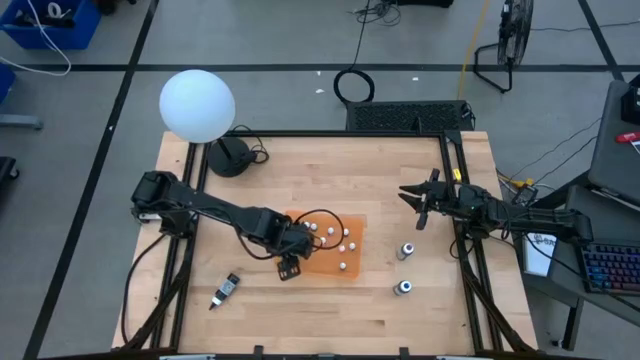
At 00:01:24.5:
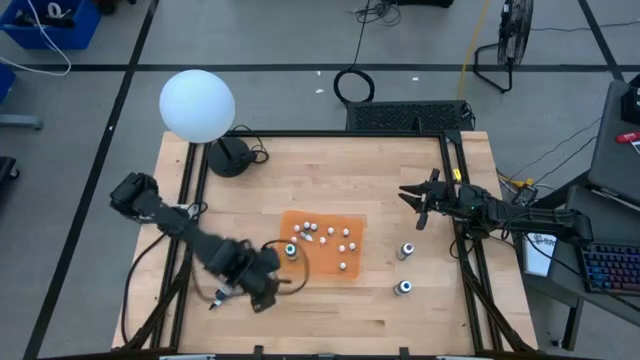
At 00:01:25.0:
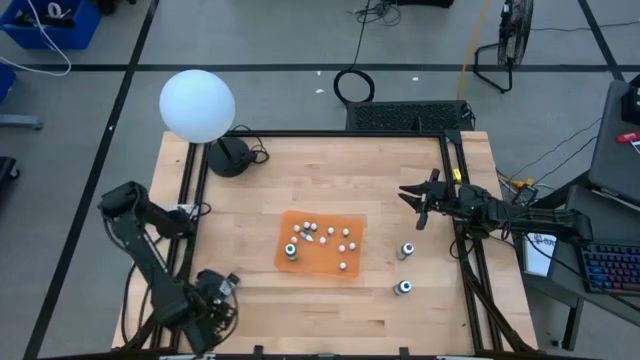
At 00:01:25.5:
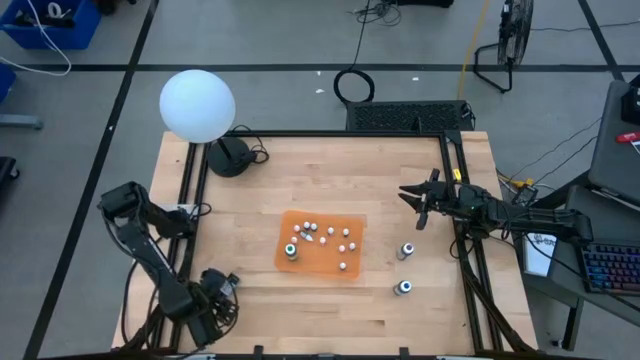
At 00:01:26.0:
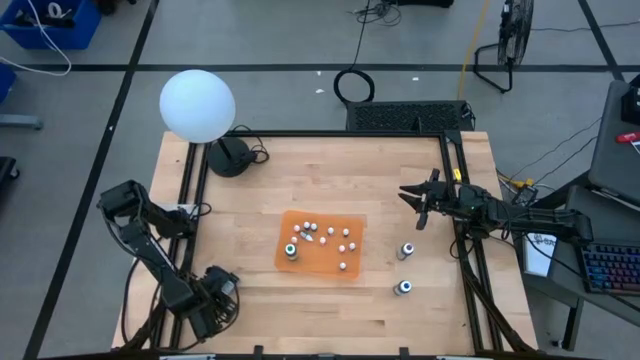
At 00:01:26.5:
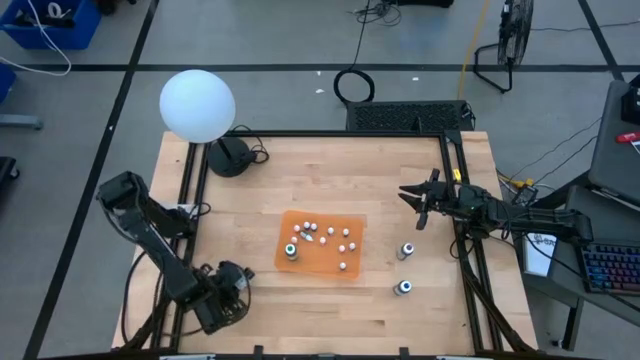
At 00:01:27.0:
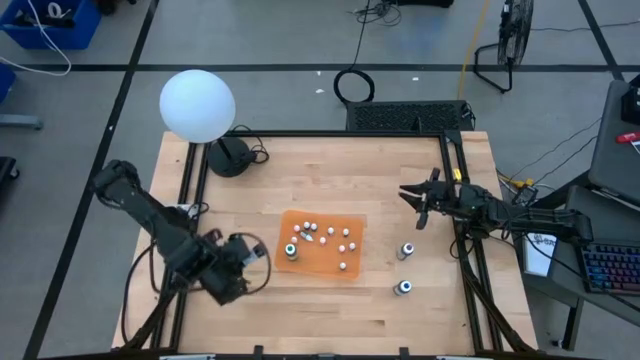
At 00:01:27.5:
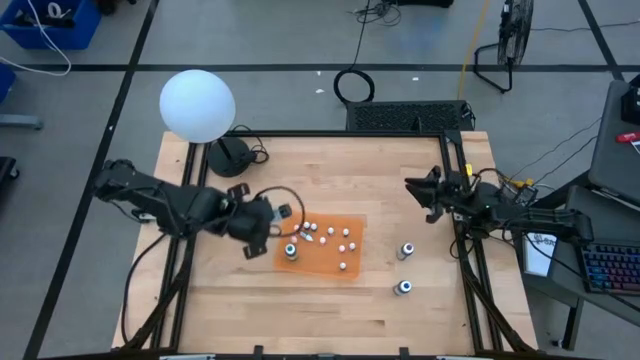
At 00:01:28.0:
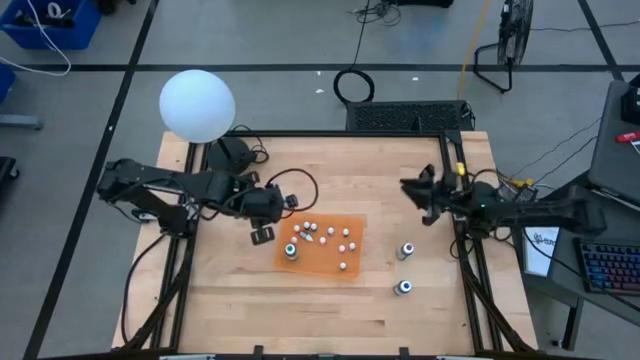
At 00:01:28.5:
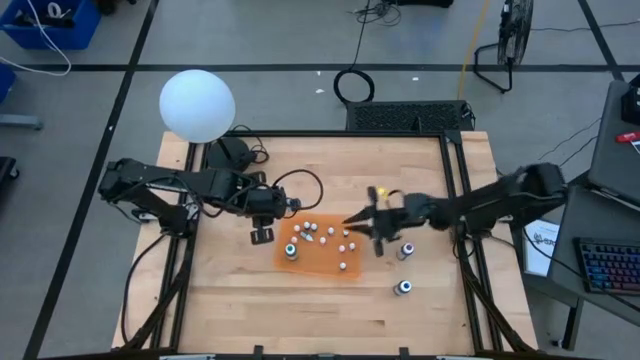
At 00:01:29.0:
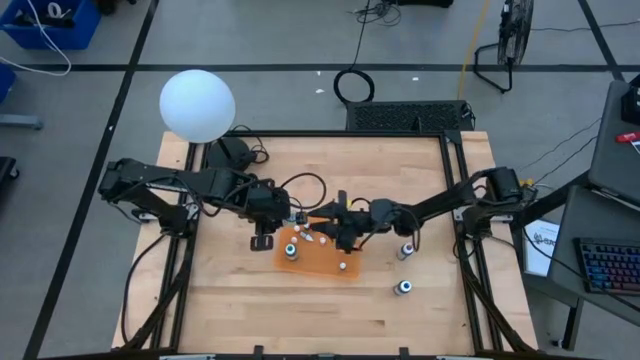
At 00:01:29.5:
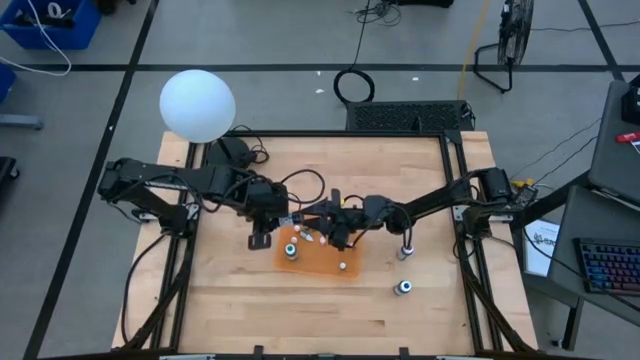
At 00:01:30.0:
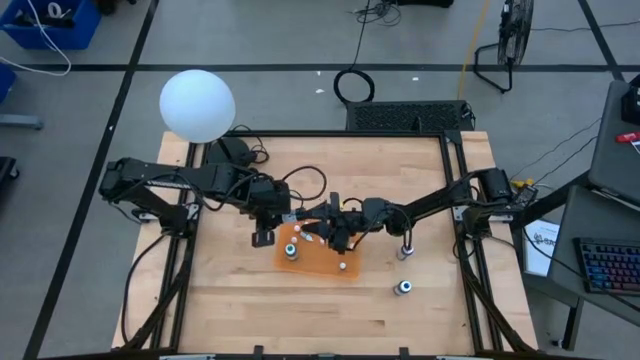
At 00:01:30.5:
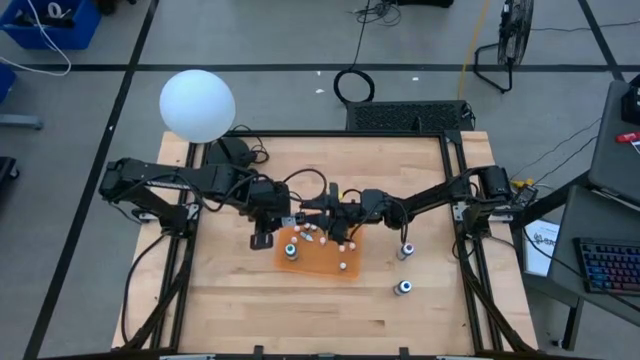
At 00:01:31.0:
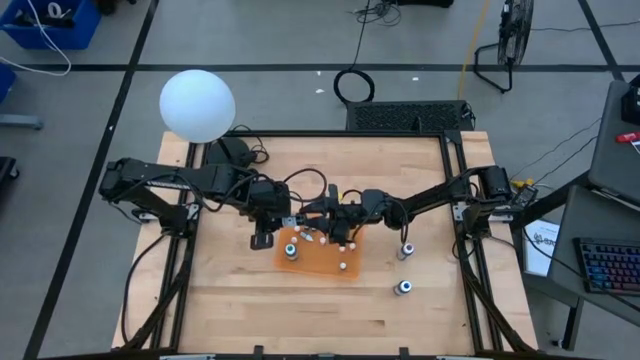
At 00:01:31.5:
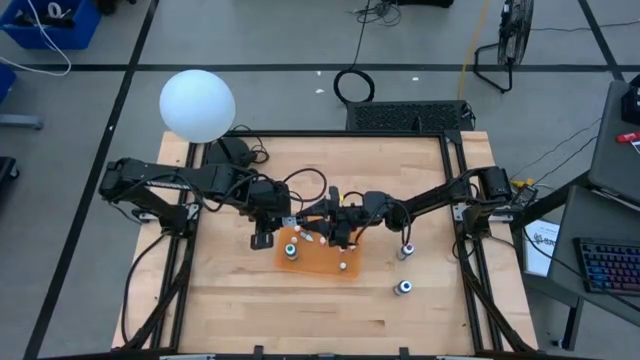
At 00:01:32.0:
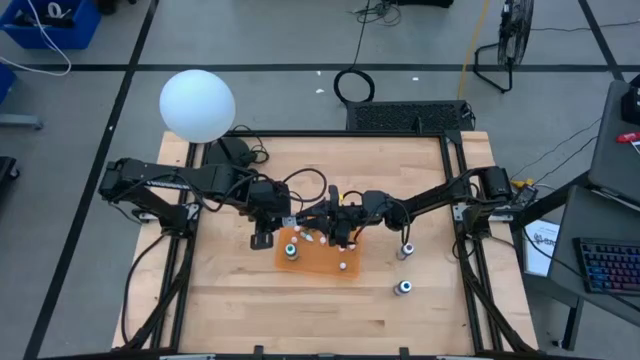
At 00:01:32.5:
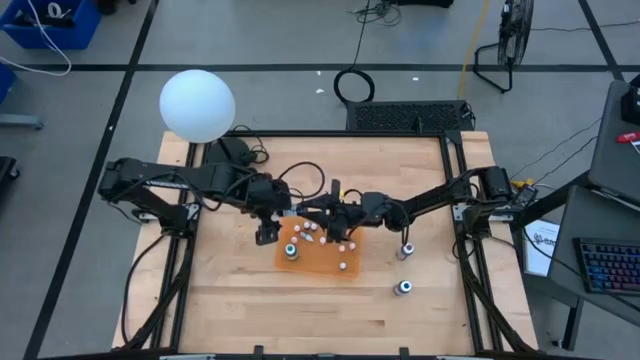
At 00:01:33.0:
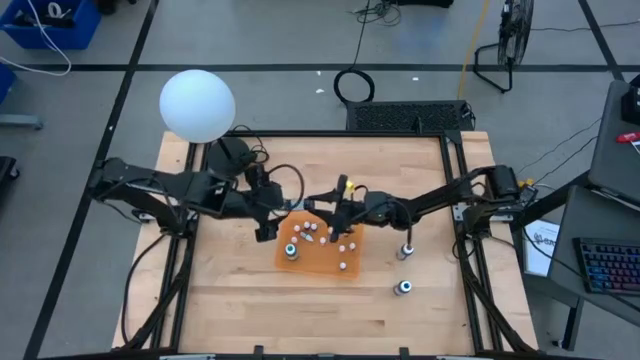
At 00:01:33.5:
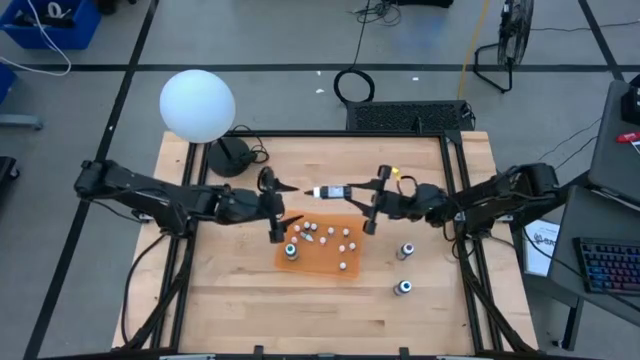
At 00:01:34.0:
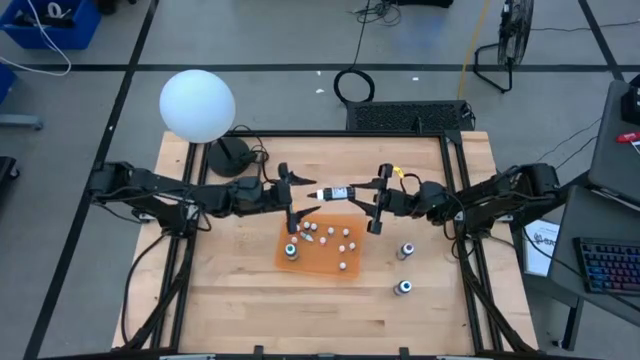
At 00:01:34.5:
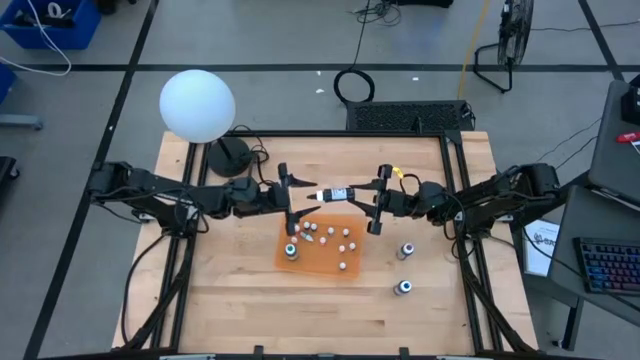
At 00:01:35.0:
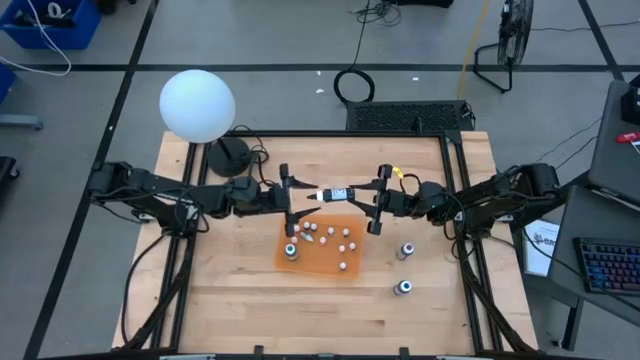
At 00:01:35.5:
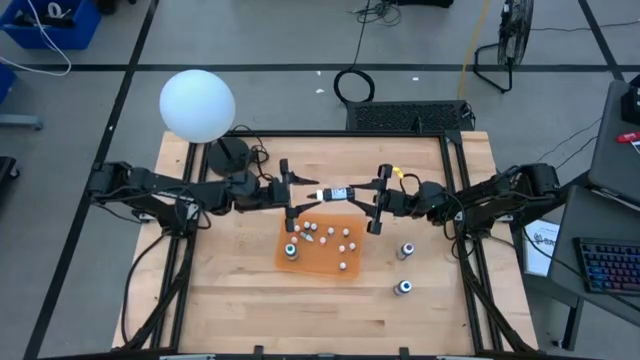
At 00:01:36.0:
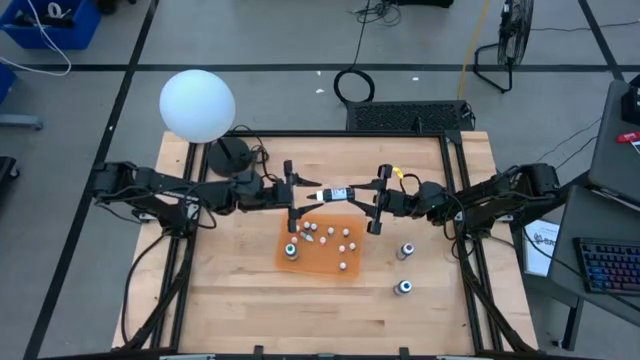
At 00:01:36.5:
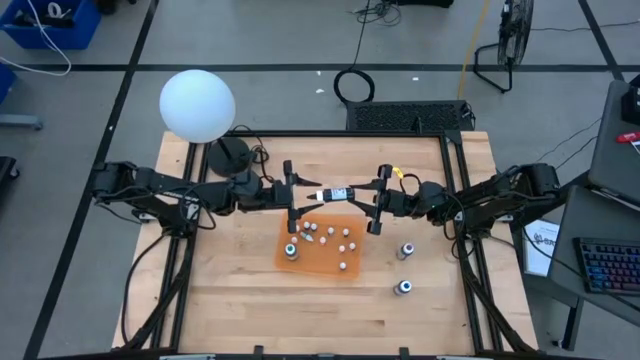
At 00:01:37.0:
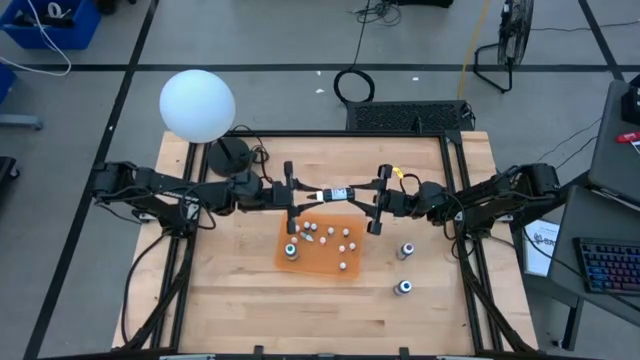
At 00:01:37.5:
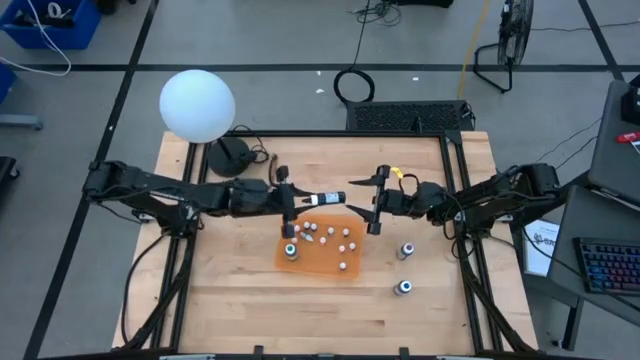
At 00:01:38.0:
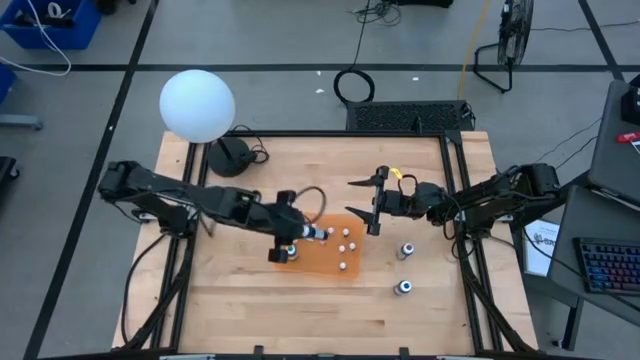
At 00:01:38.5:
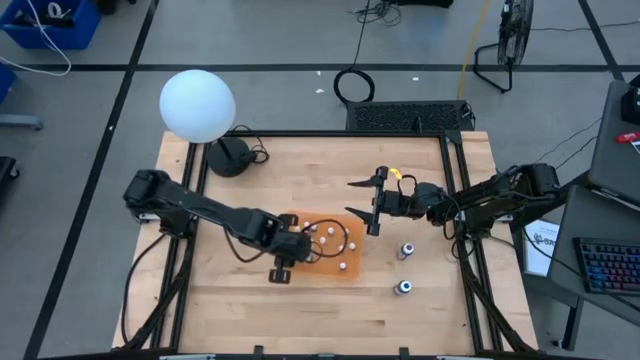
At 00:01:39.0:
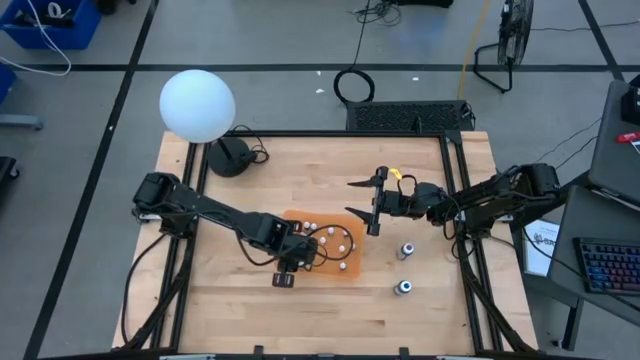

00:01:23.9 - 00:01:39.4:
Task: Pick & Place food coloring
Put the large black food coloring bottle into the orange bin

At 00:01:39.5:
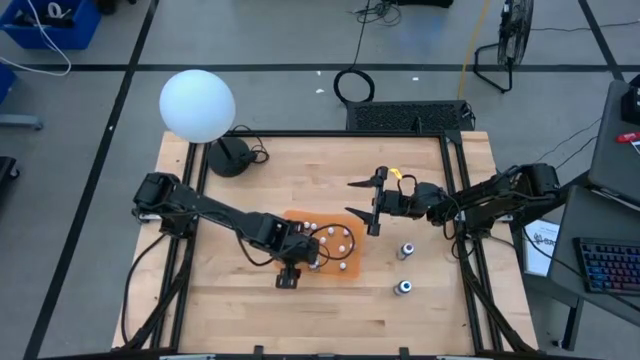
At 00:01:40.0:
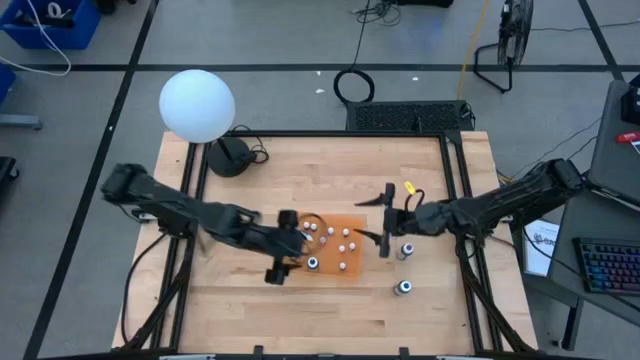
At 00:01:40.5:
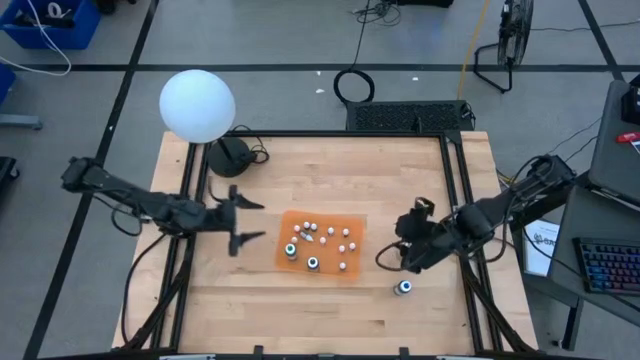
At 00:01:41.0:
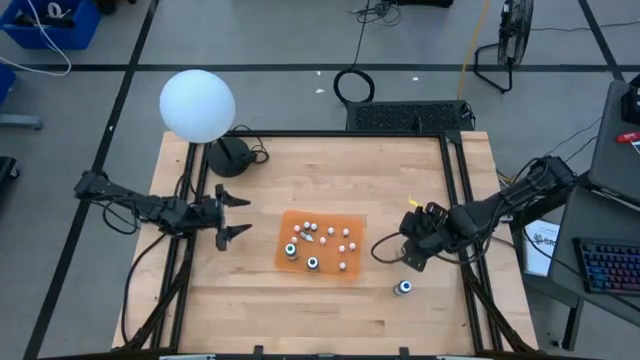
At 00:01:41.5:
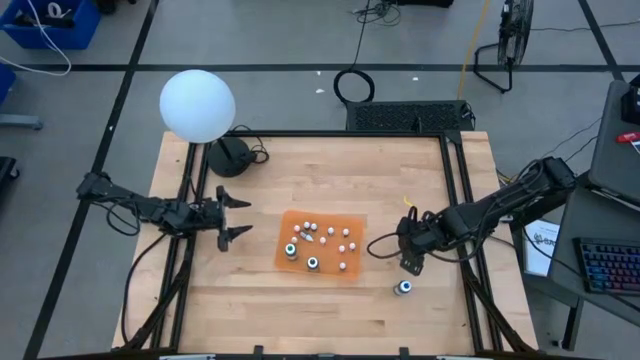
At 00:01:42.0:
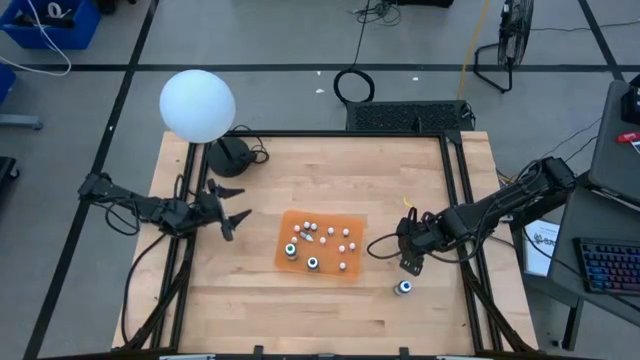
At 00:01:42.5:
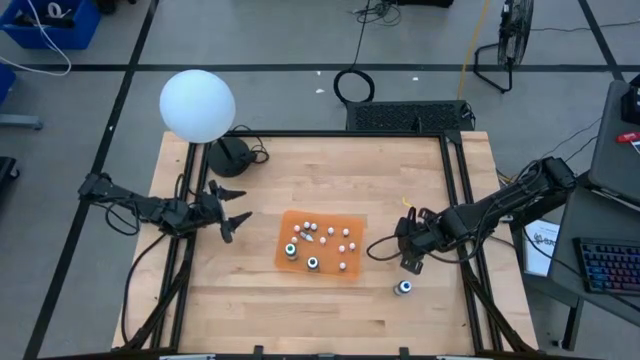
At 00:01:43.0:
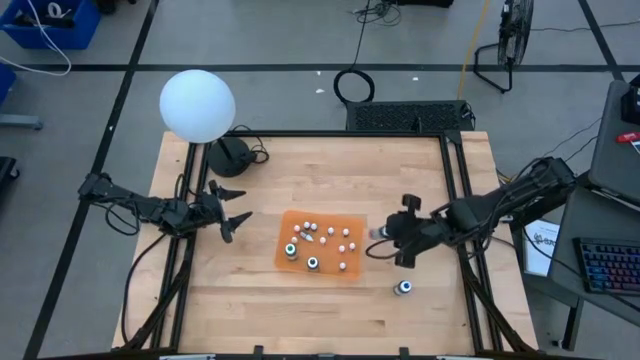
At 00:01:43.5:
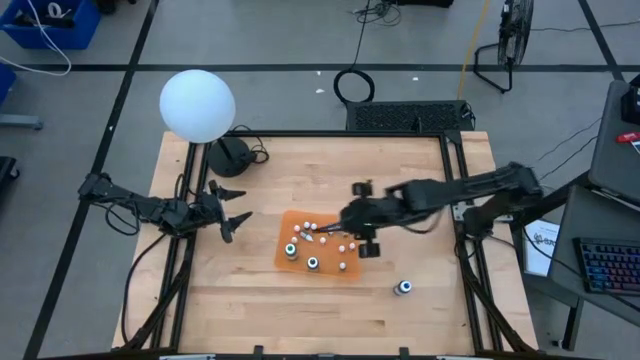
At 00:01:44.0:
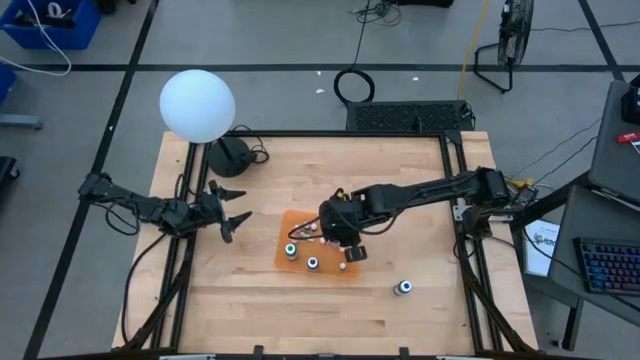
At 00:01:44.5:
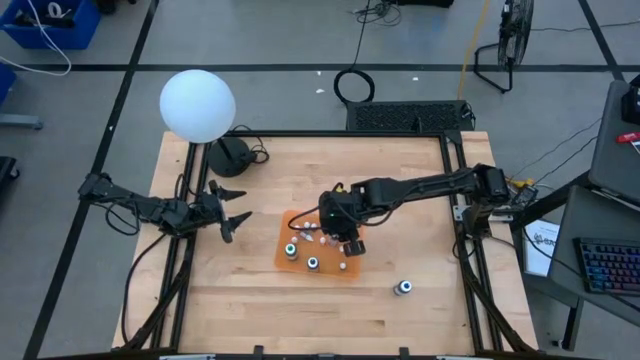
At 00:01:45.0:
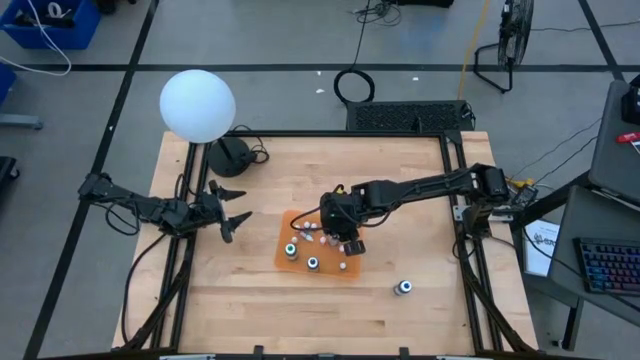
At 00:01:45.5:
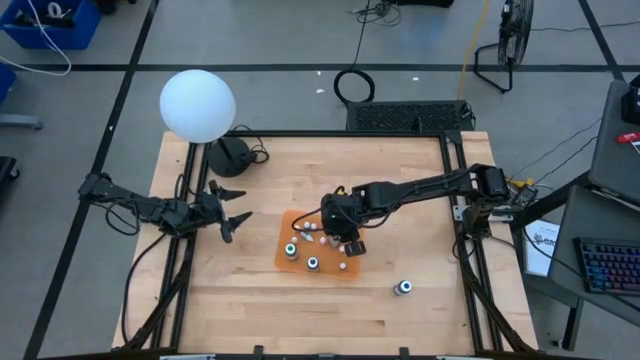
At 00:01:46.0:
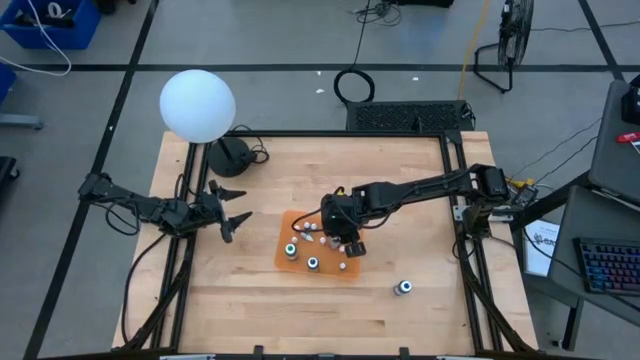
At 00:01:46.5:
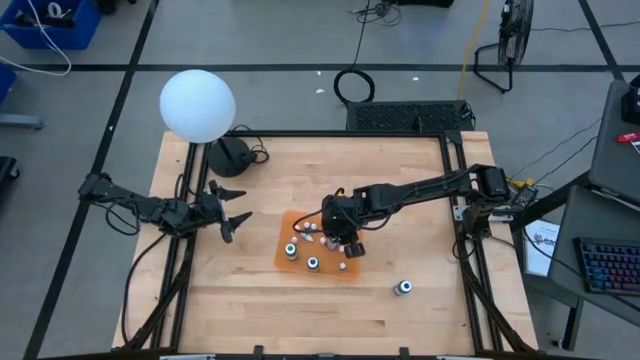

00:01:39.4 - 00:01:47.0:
Put the large purple food coloring bottle into the orange bin
